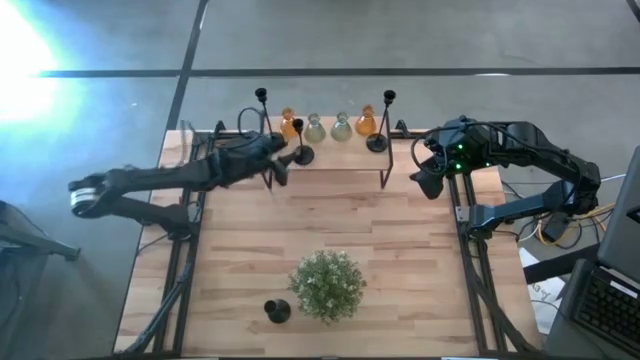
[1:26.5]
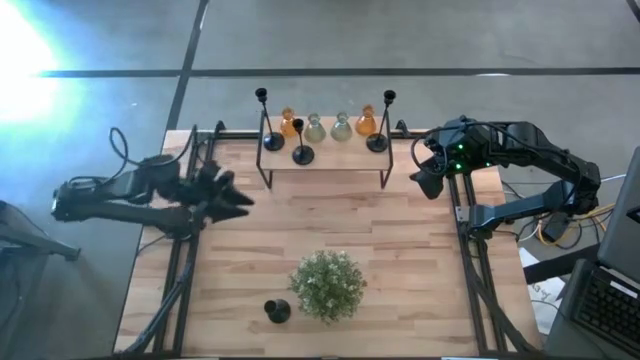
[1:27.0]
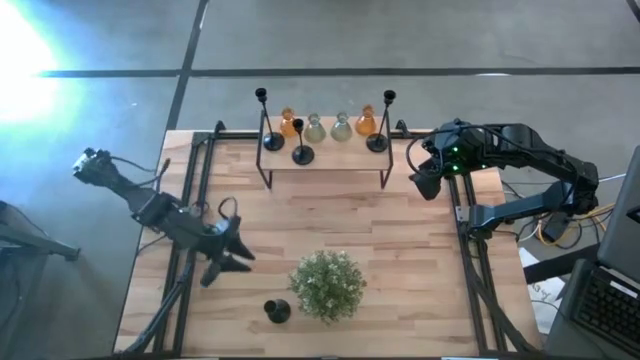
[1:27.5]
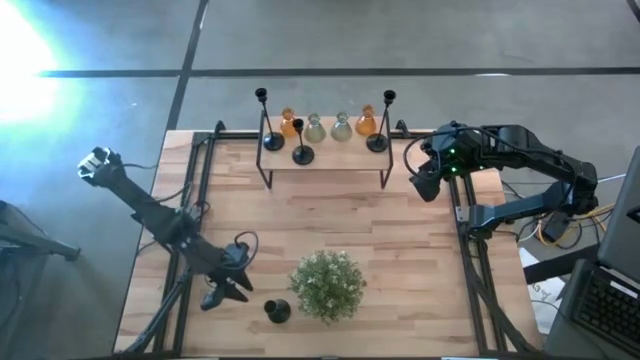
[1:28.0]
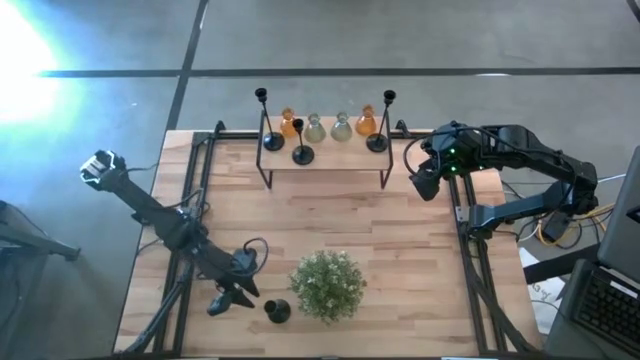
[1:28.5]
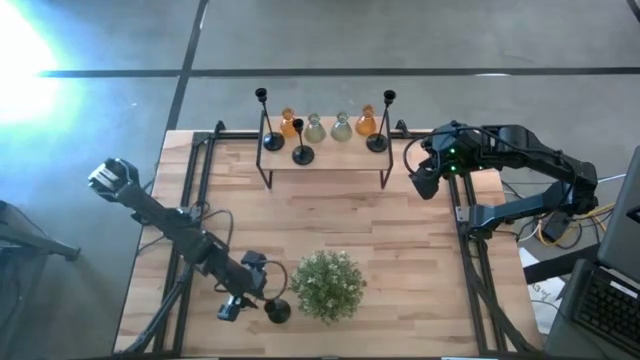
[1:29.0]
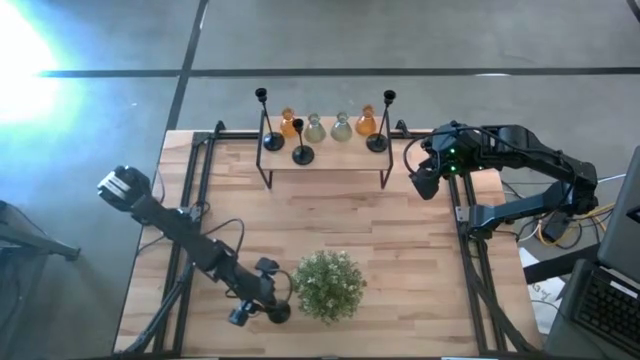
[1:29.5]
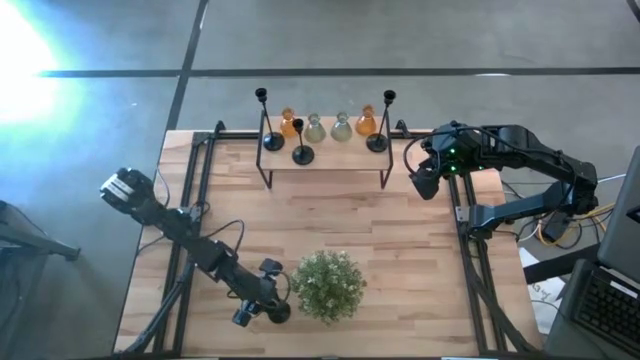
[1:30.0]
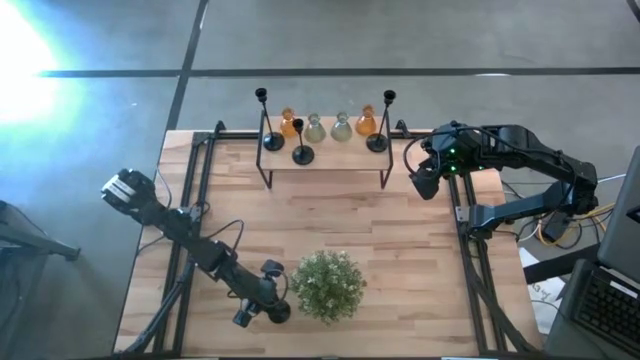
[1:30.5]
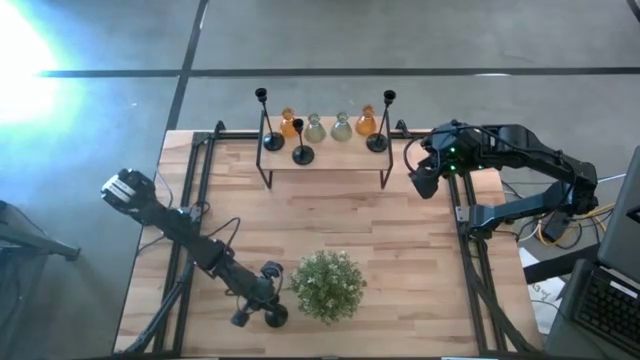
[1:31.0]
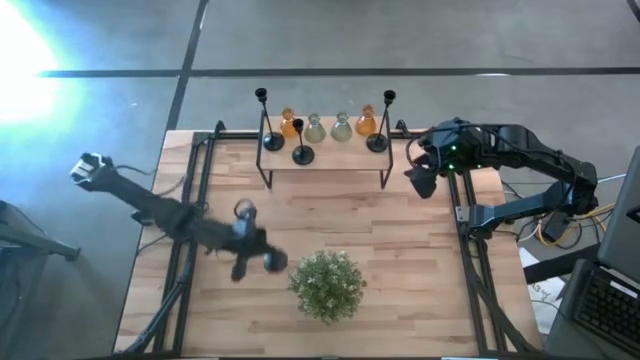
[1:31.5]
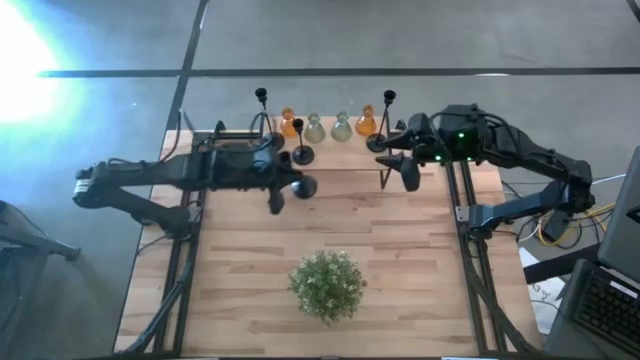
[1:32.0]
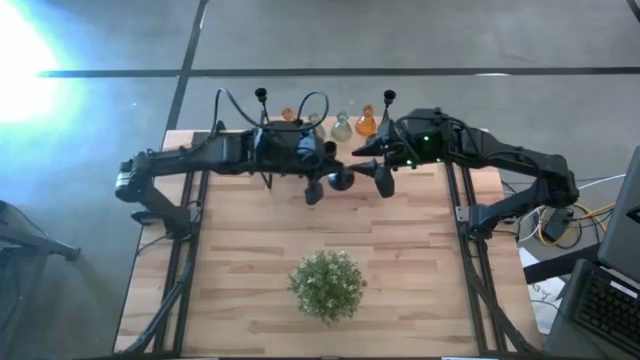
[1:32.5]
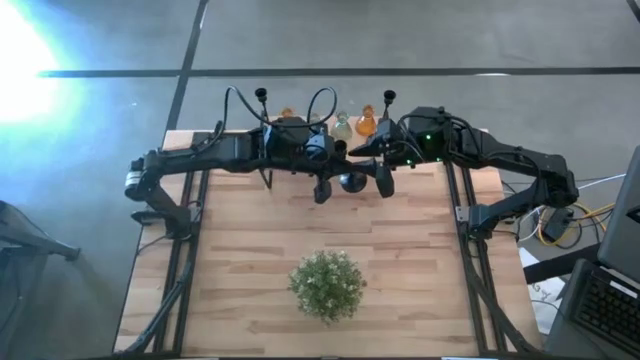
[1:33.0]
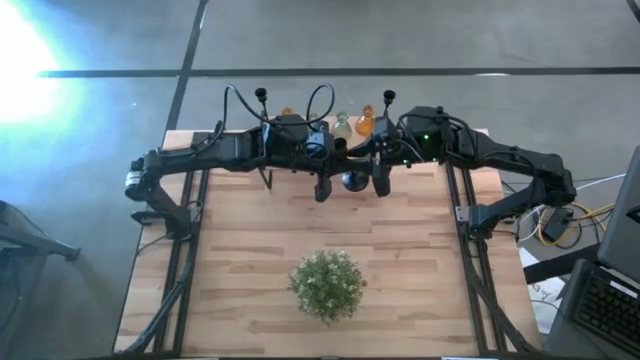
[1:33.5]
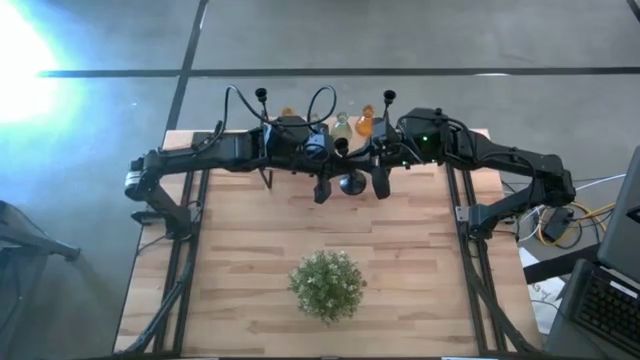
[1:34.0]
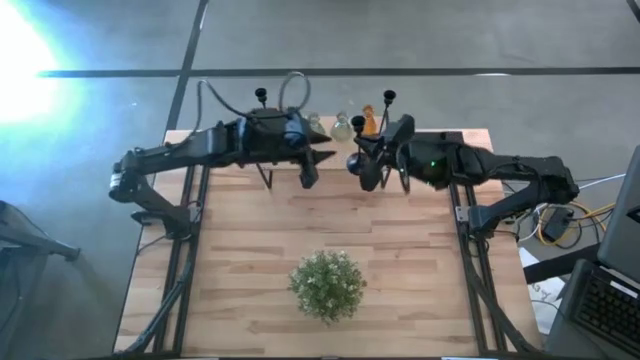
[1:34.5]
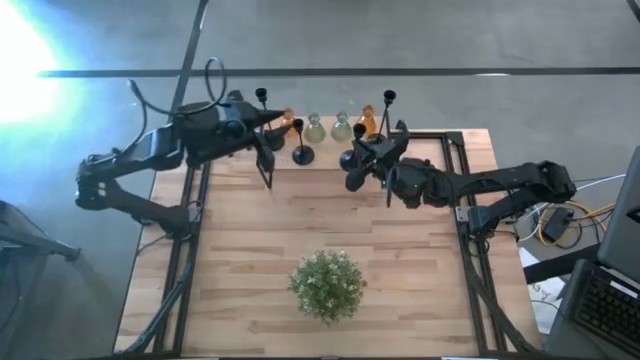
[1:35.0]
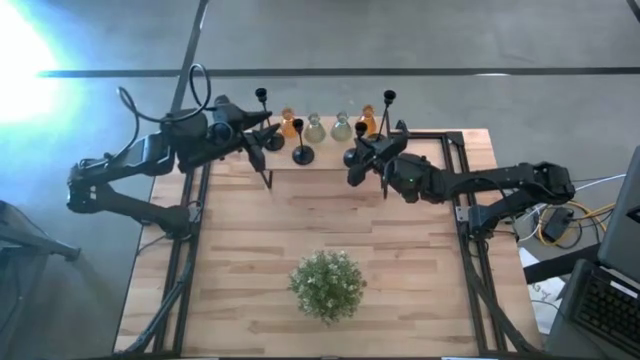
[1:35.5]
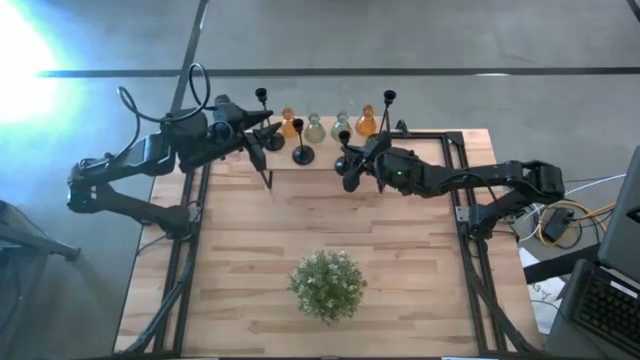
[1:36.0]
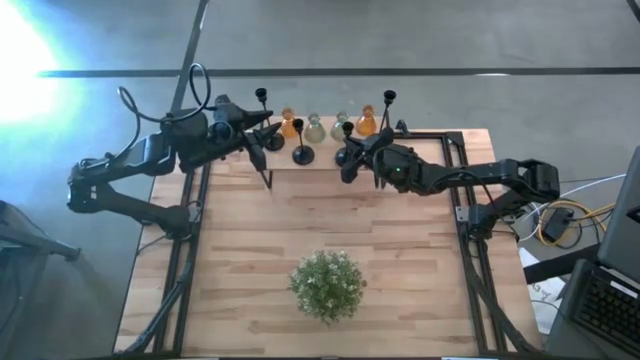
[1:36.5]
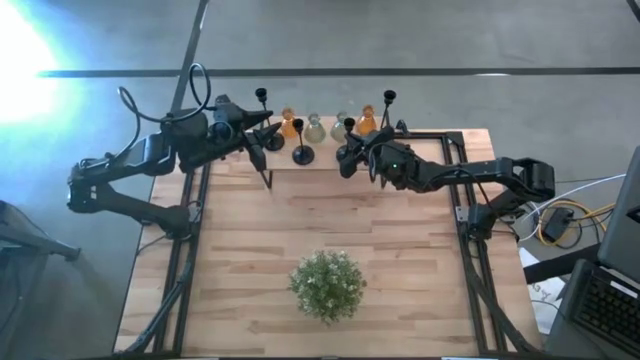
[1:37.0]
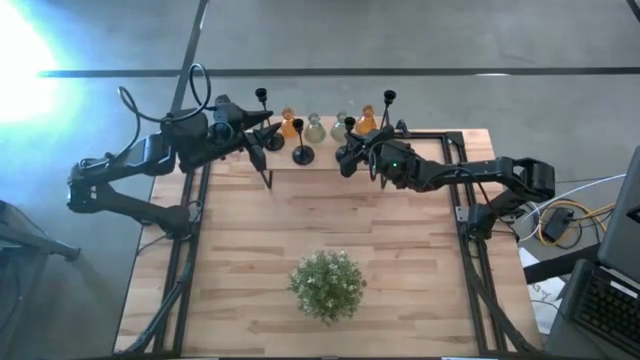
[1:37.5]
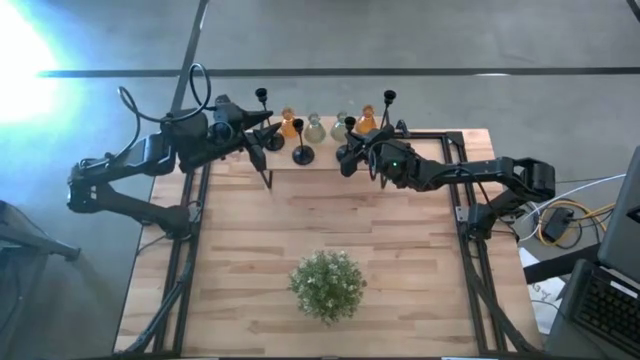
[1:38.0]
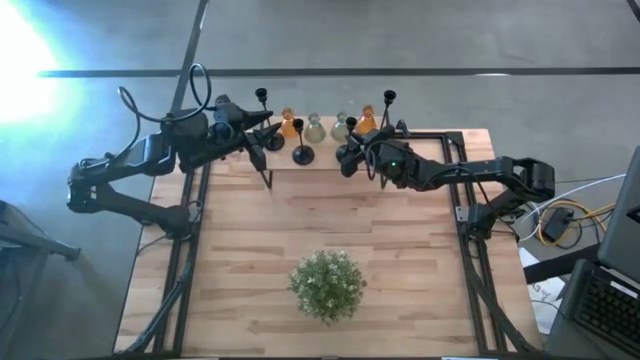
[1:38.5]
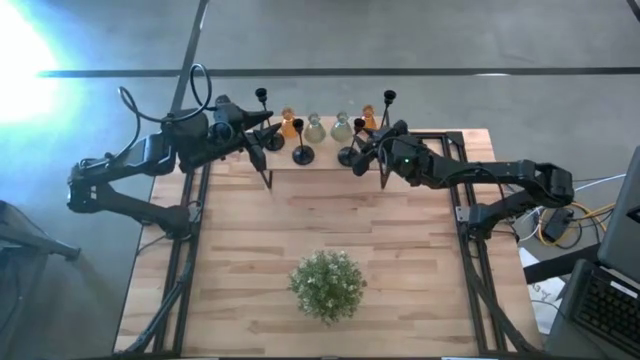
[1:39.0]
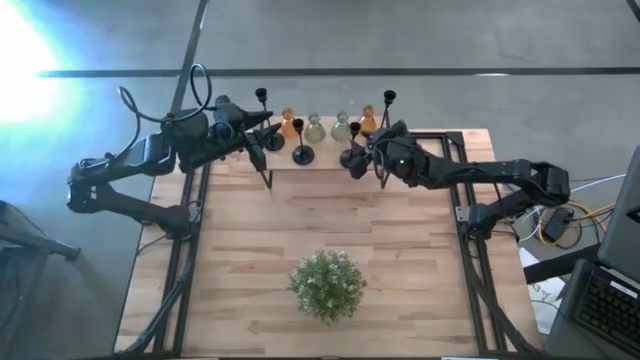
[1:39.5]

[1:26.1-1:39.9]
Task: Pick & Place candle stick holders
Put the black candle holder on the shelf aligned with the other black candle holder

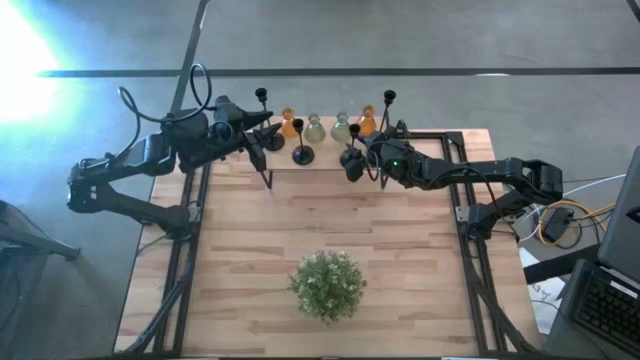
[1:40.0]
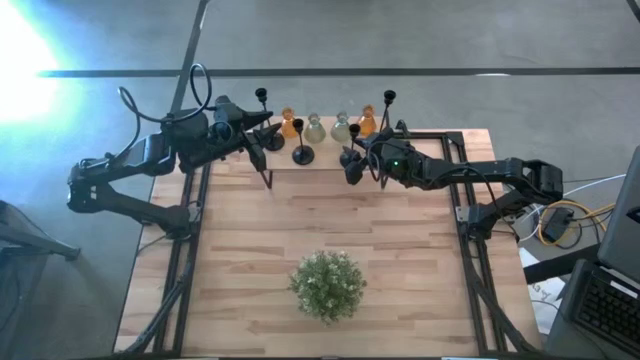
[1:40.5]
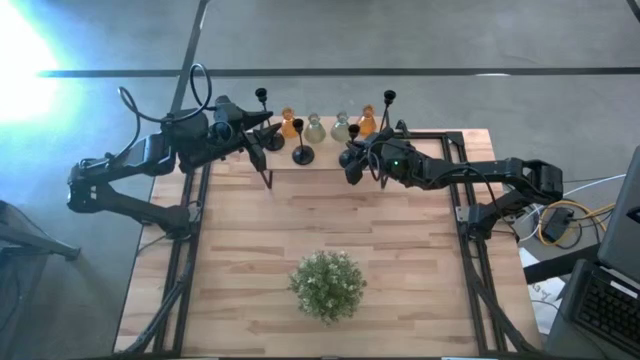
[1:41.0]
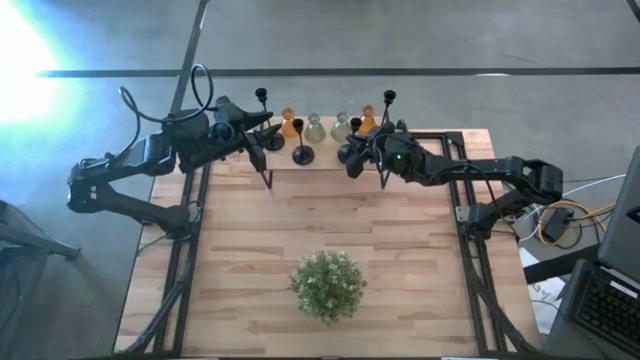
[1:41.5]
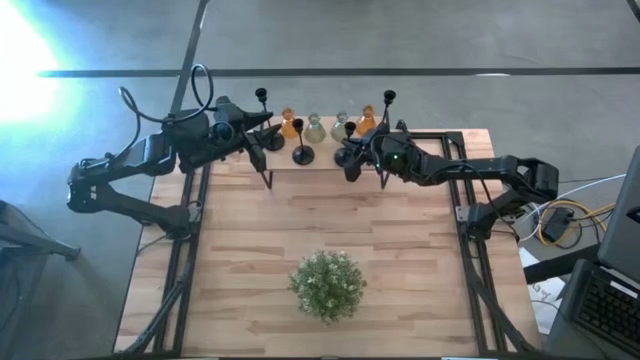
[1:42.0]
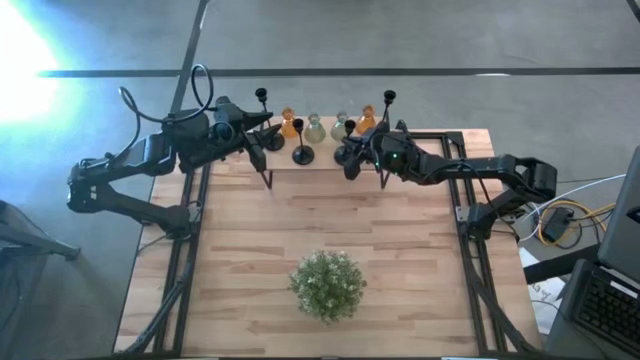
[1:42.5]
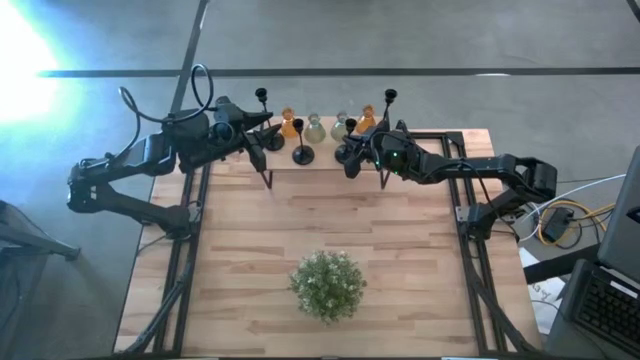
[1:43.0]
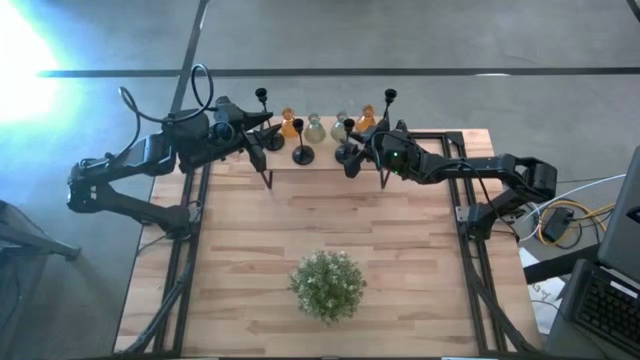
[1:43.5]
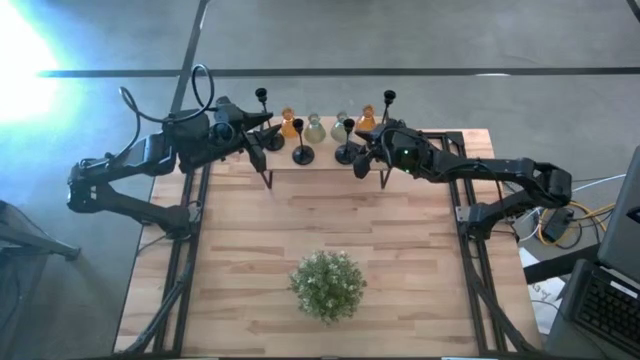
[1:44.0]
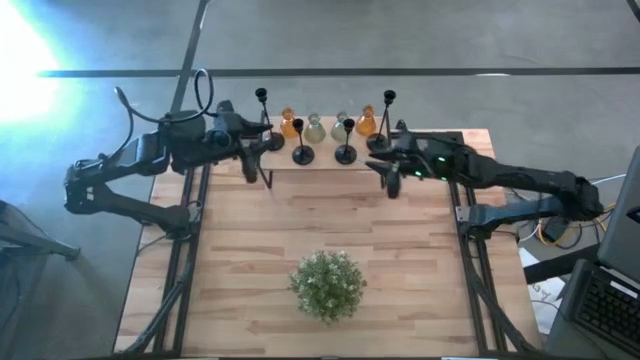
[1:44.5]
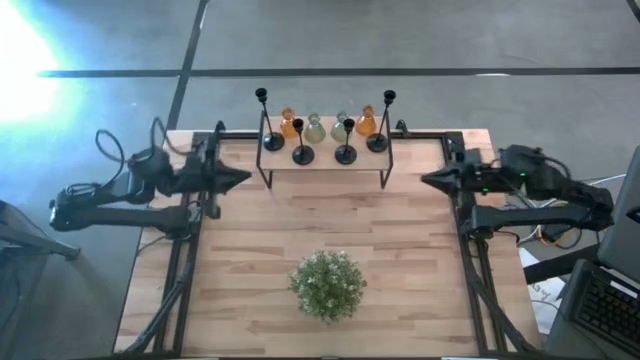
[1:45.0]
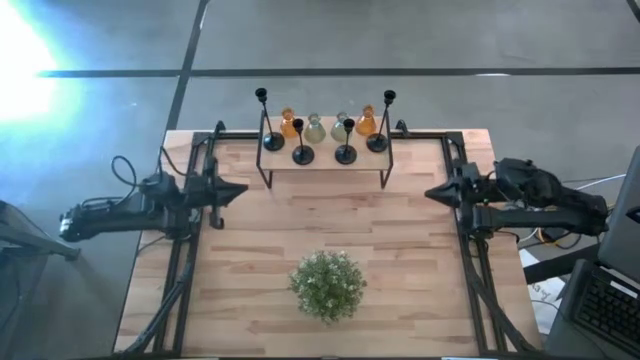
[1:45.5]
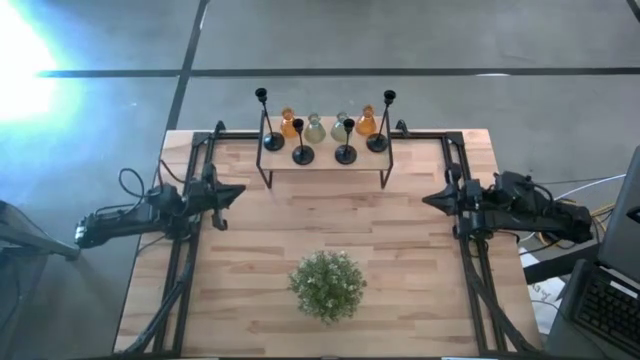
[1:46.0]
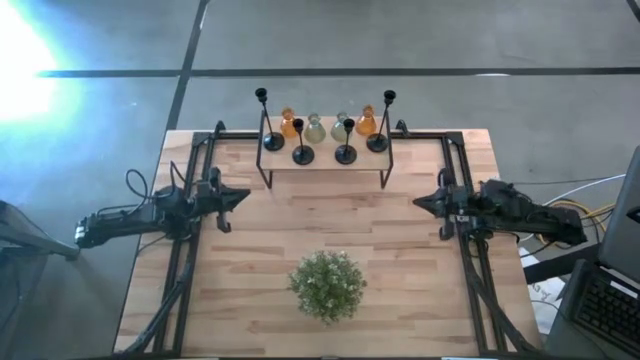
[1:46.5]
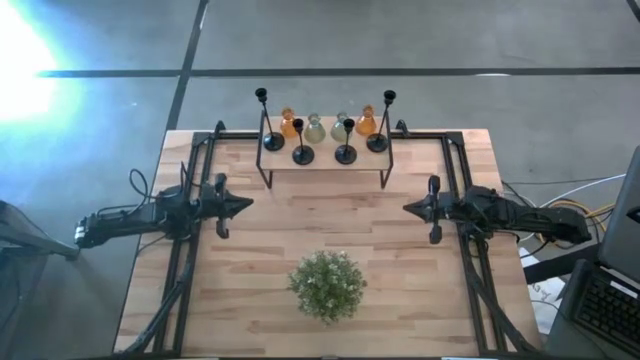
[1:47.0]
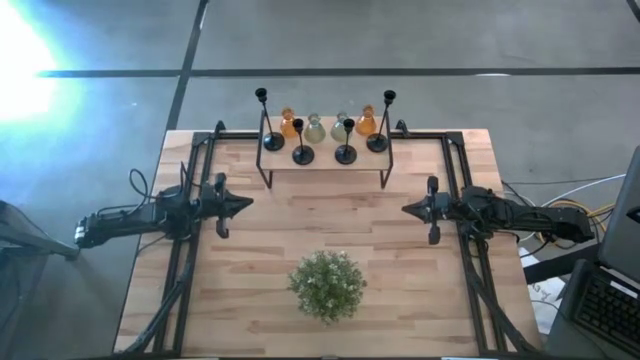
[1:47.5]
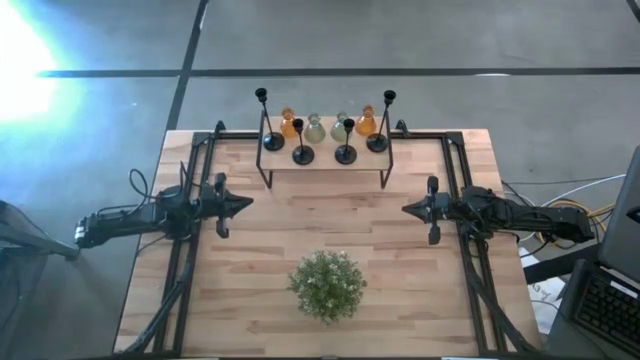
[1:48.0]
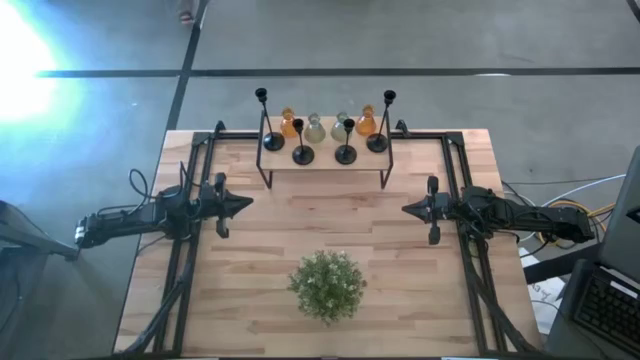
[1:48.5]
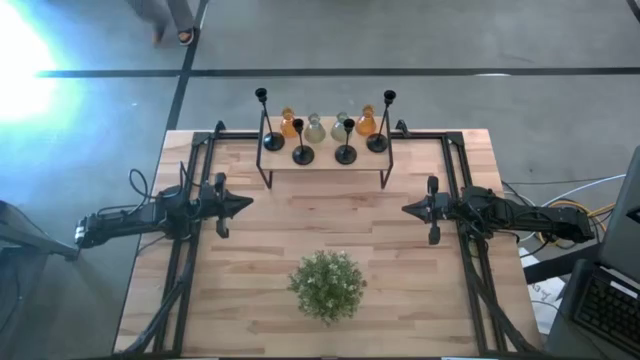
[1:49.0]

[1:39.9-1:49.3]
Return to Home Position
